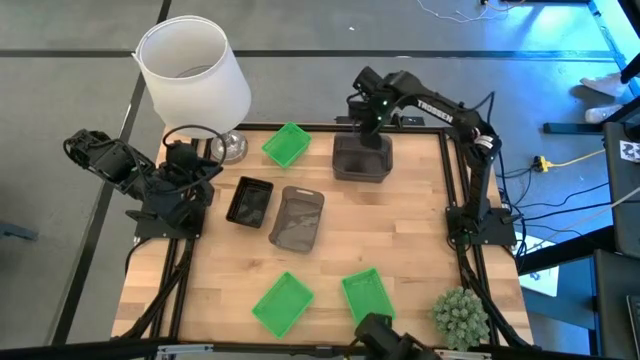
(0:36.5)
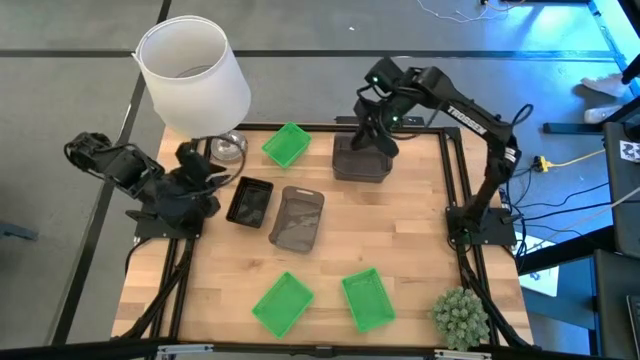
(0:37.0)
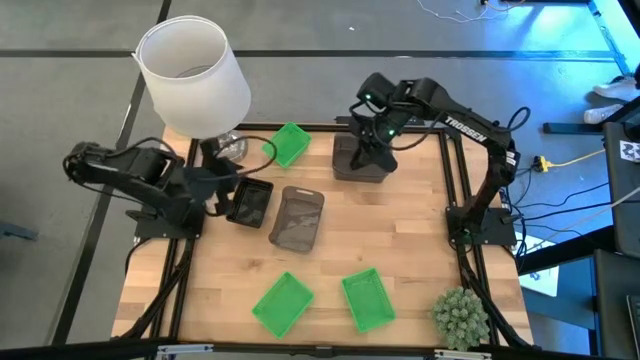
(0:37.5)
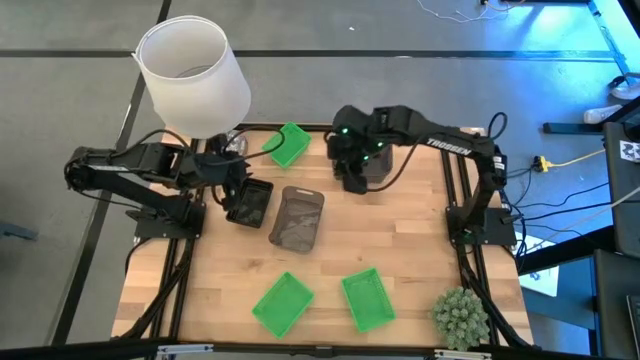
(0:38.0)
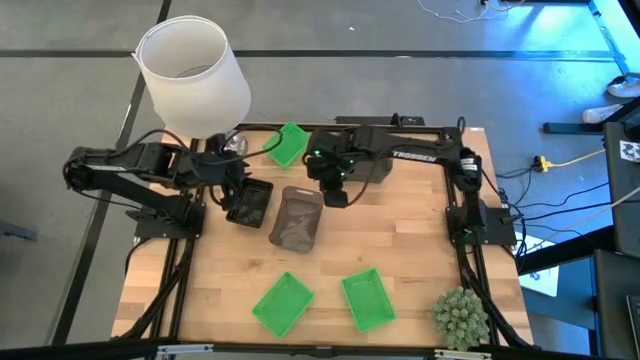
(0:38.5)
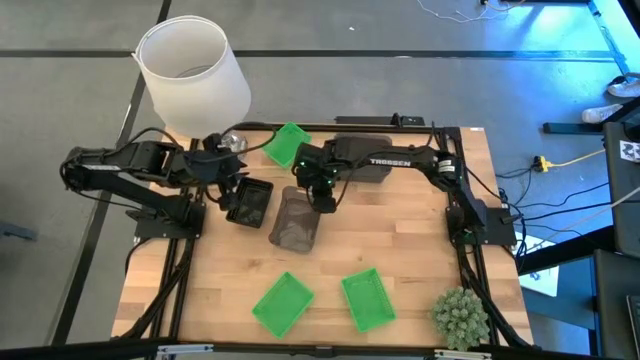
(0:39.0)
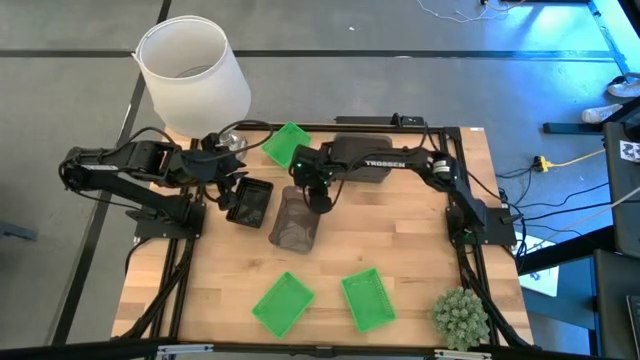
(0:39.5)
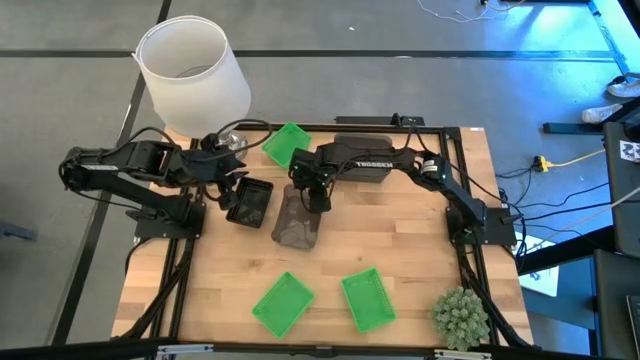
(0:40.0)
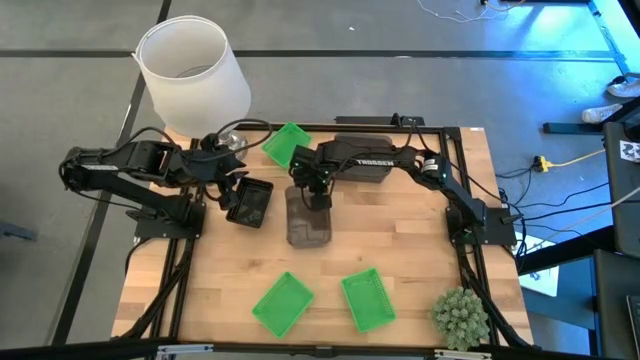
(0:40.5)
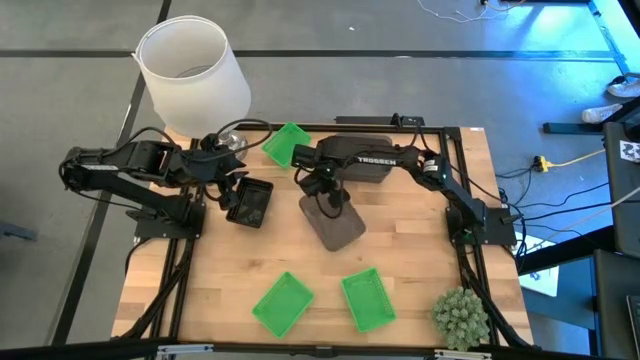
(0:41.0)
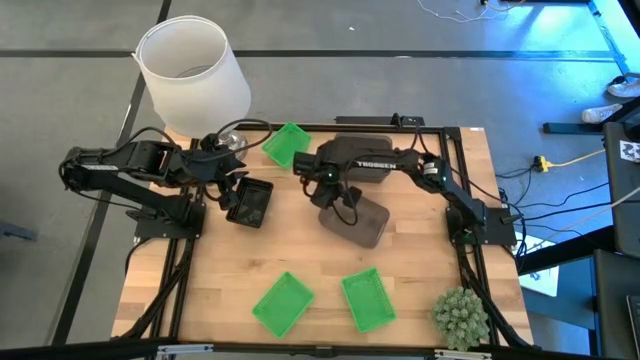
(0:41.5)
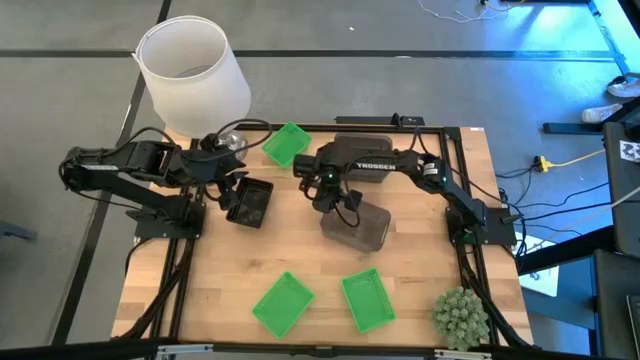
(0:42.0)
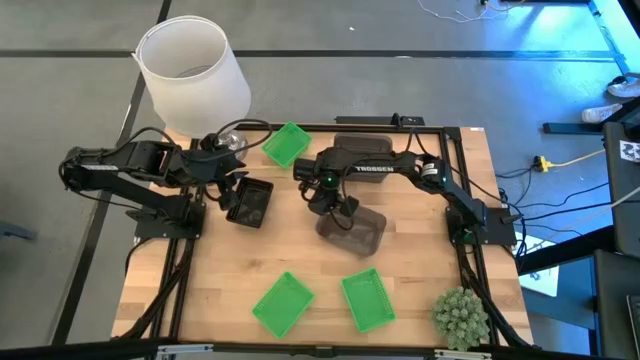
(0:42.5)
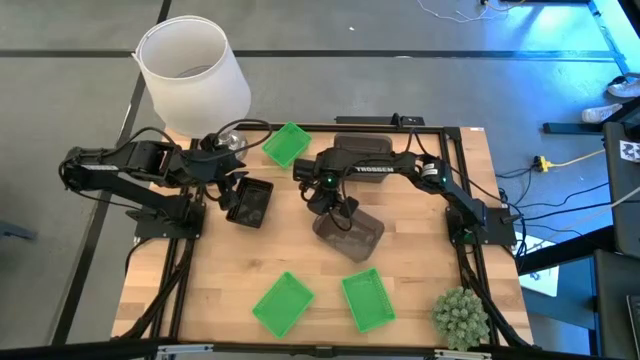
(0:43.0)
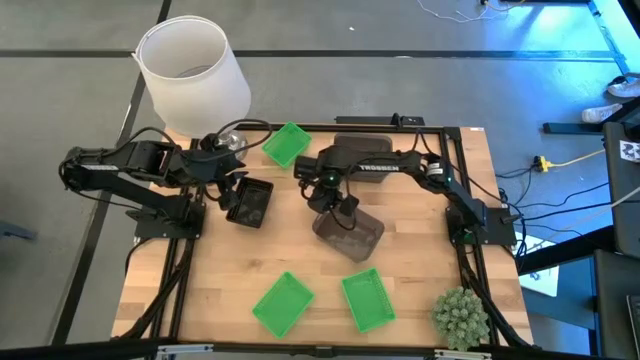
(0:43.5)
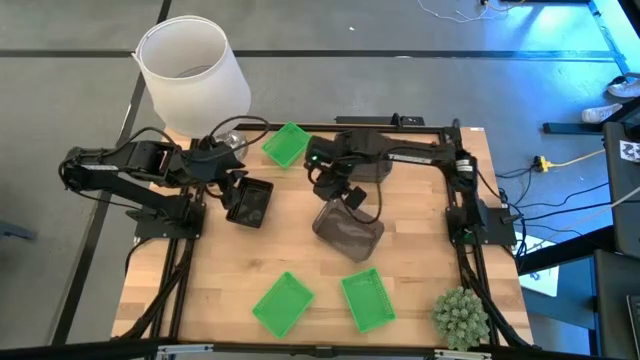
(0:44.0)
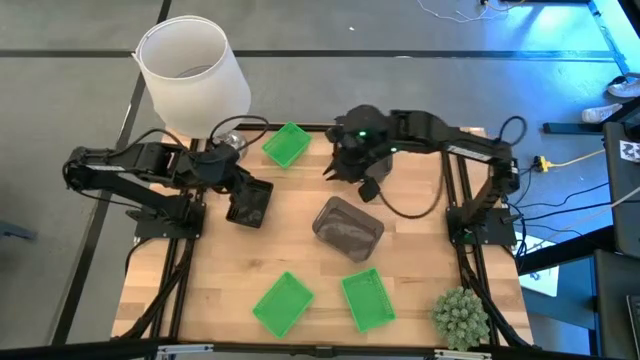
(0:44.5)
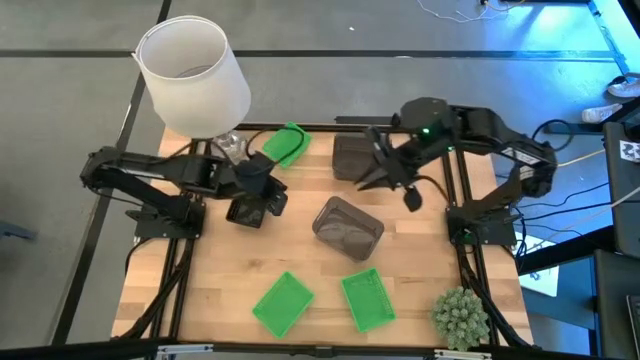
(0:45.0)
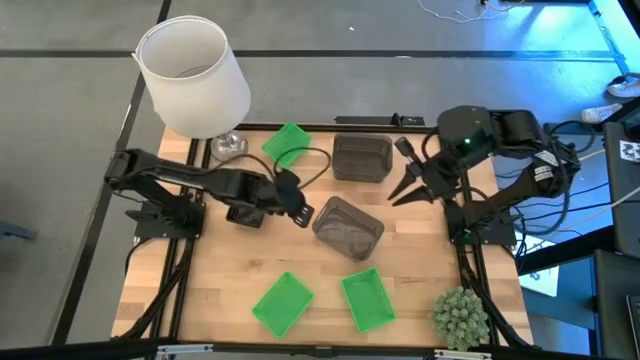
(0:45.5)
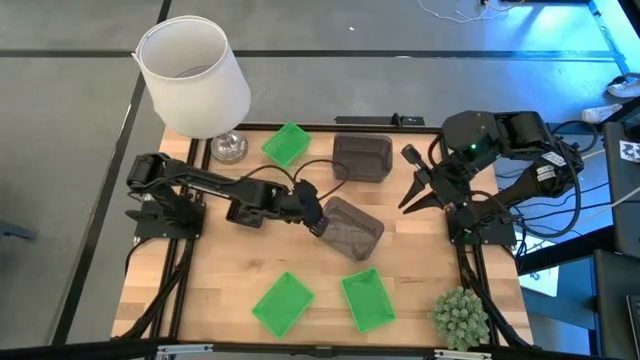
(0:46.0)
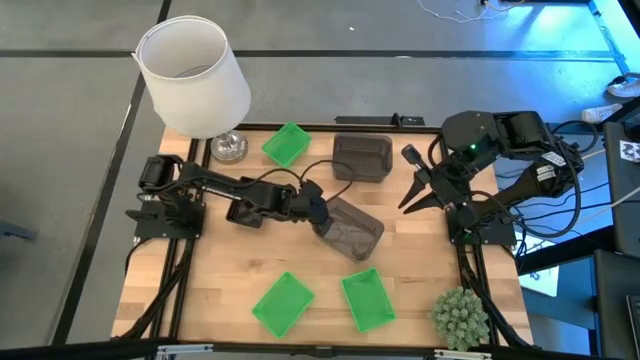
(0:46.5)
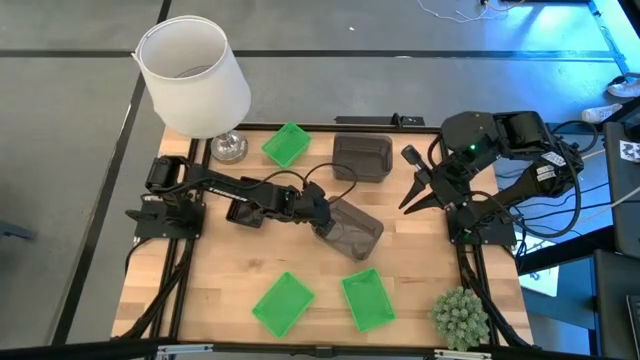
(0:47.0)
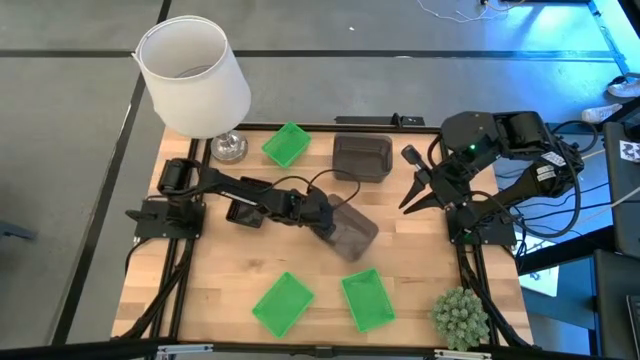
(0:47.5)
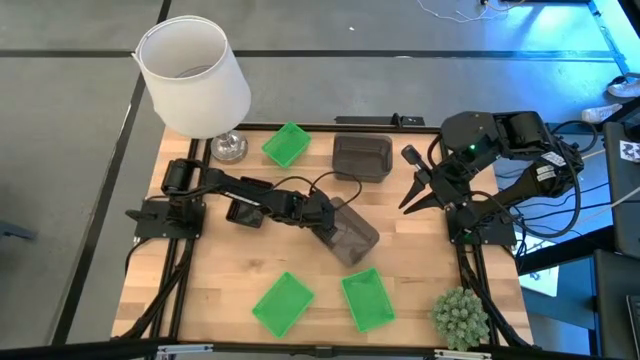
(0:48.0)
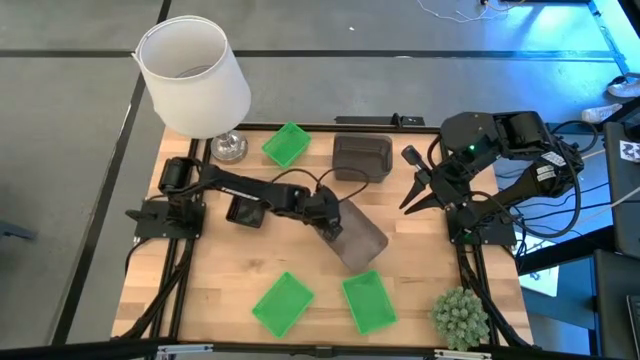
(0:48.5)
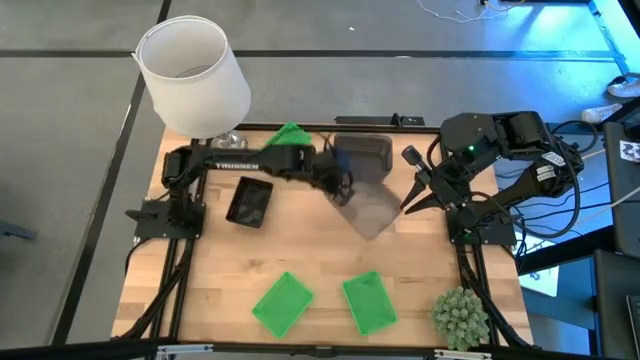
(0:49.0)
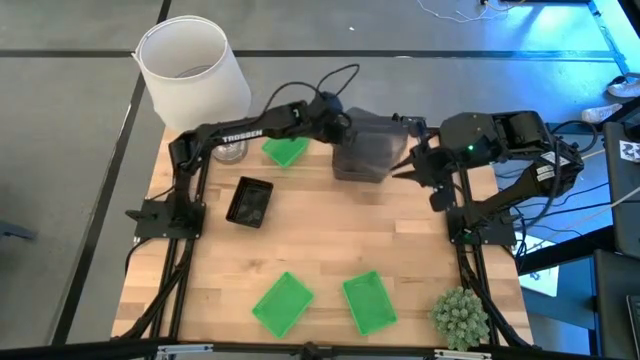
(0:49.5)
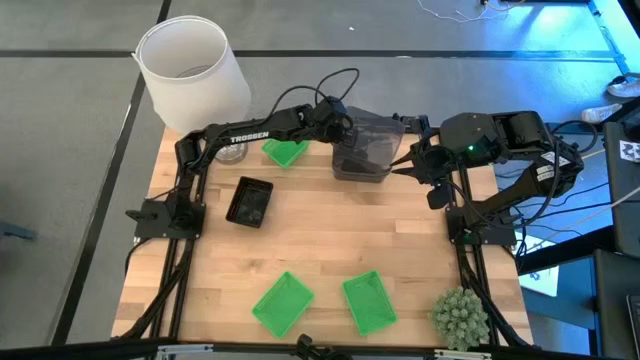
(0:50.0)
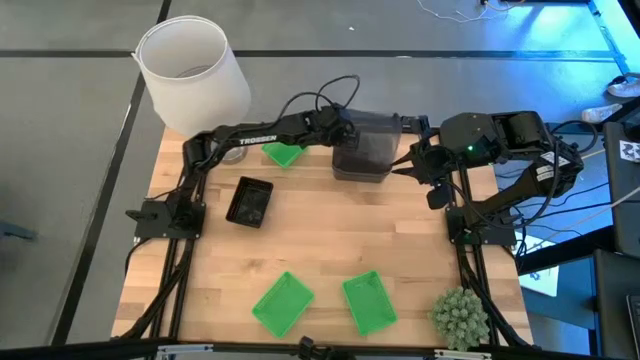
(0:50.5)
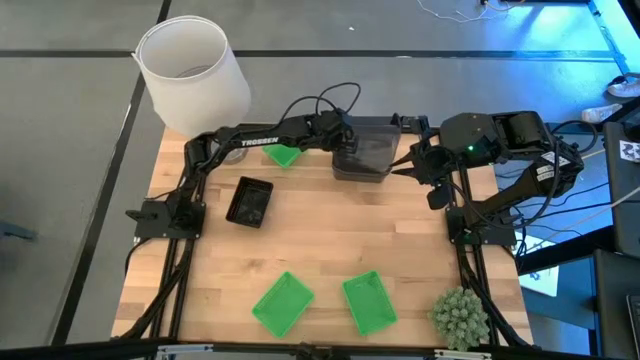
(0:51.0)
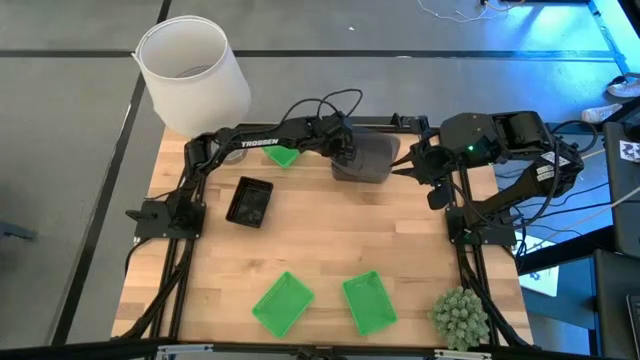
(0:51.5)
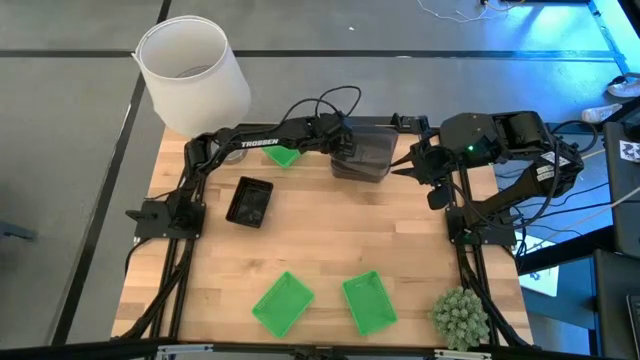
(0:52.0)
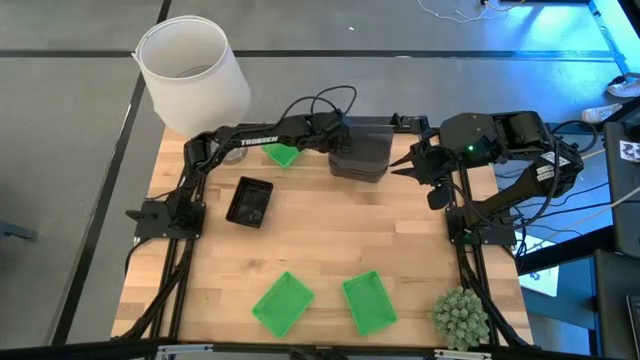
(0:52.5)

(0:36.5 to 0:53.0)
Stack the bottom transparent black bin on the top transparent black bin

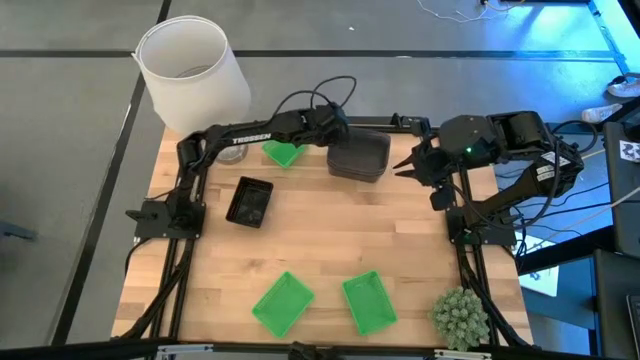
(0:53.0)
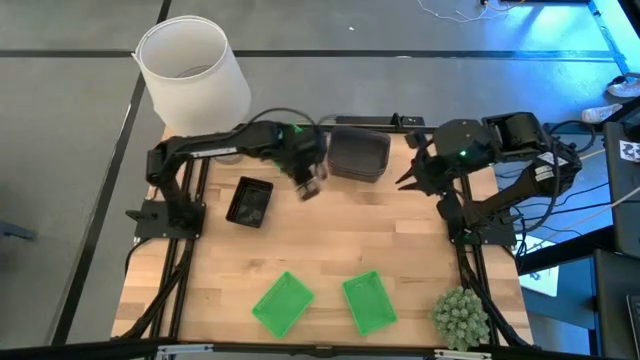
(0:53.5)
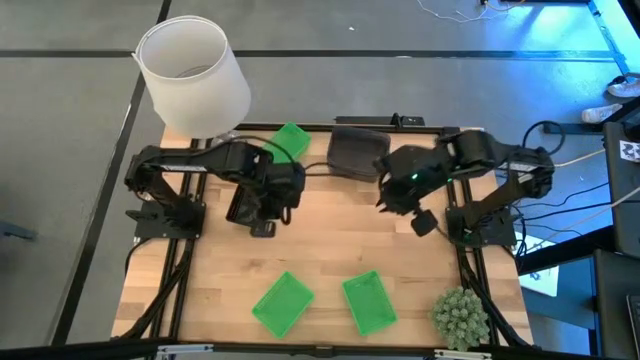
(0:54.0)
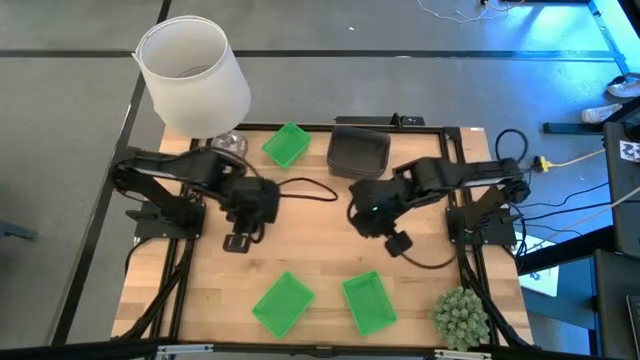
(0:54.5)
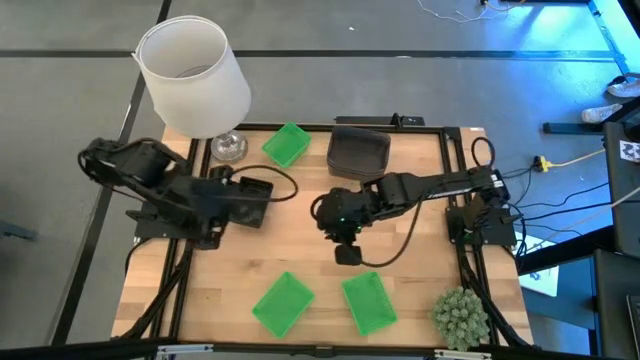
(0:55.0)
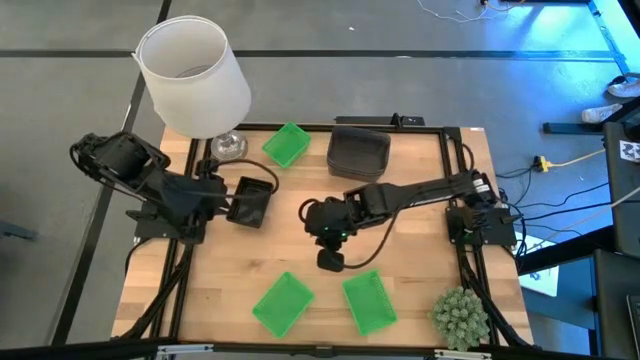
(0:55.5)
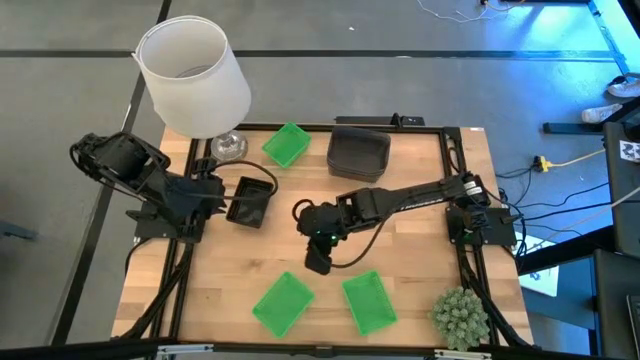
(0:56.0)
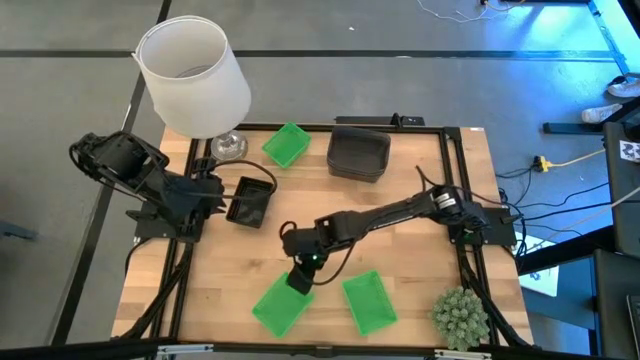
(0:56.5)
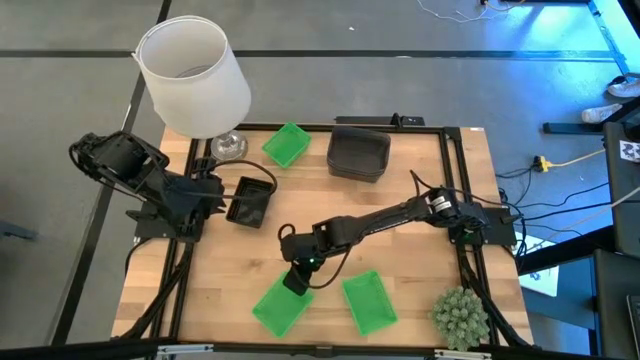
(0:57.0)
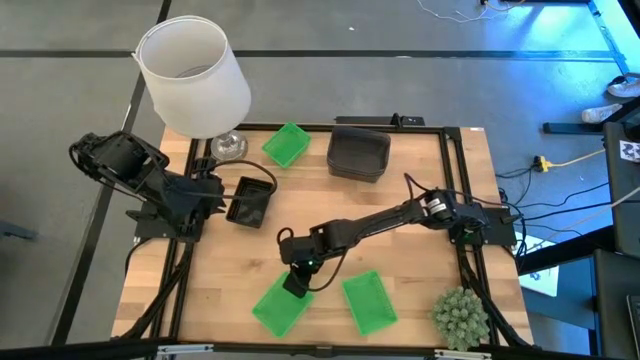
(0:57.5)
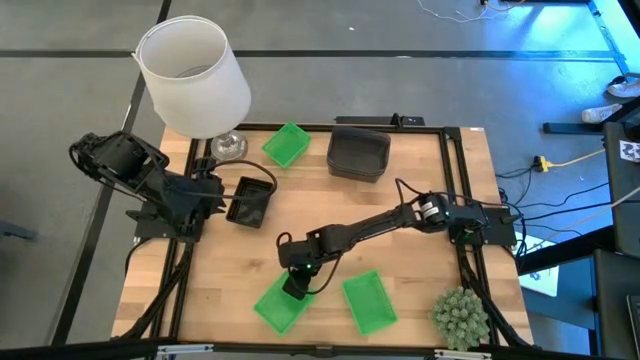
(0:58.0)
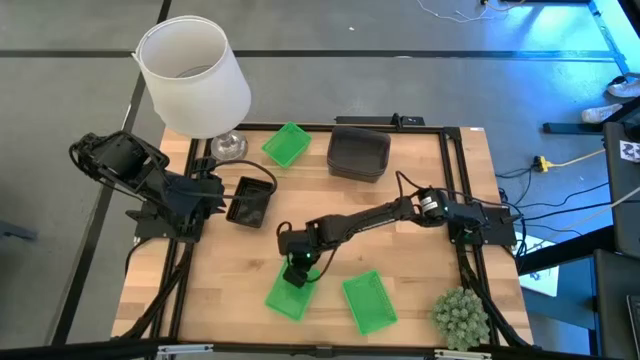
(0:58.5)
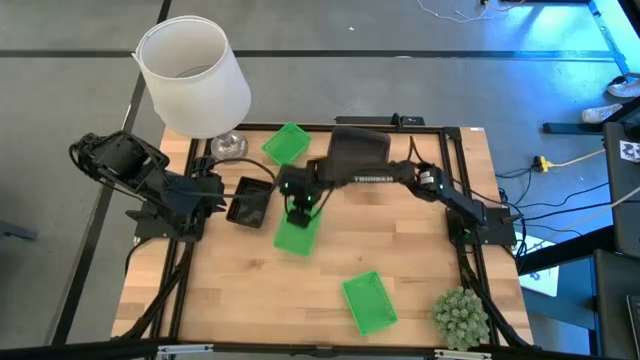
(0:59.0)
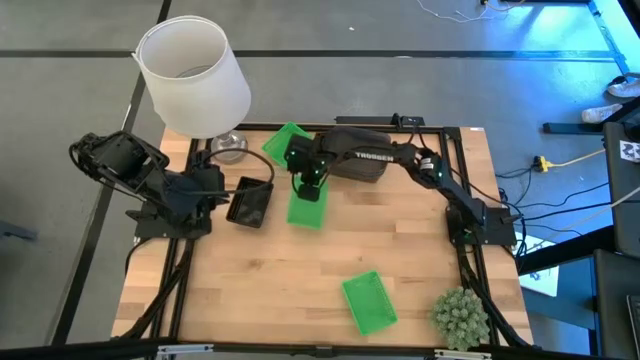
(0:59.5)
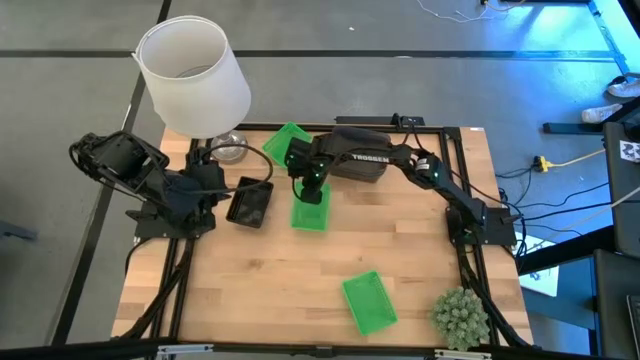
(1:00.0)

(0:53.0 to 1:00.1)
Prepare the bottom left green bin
